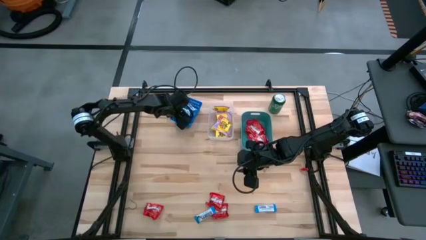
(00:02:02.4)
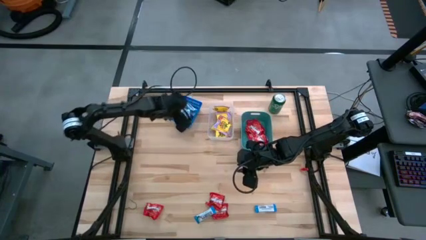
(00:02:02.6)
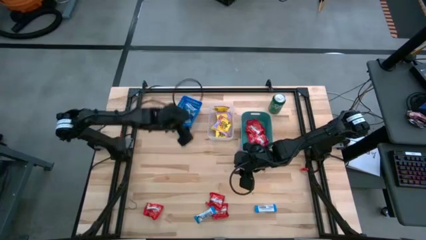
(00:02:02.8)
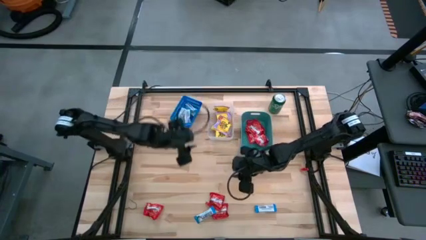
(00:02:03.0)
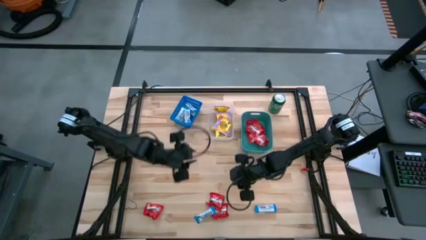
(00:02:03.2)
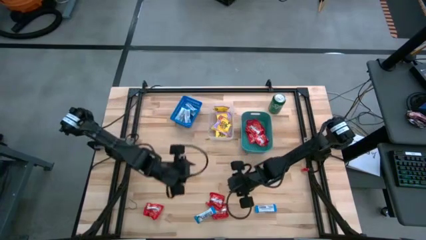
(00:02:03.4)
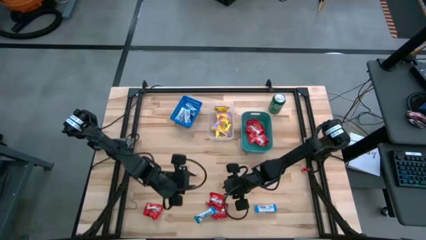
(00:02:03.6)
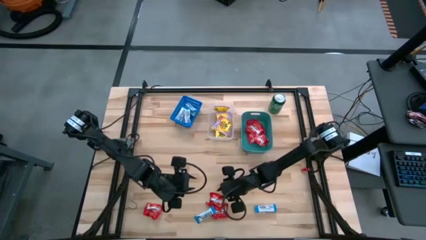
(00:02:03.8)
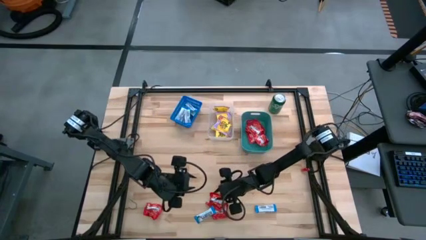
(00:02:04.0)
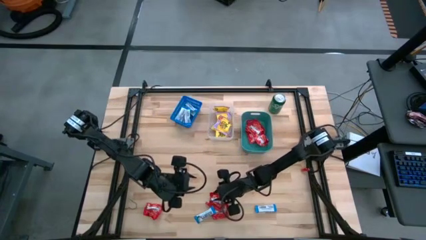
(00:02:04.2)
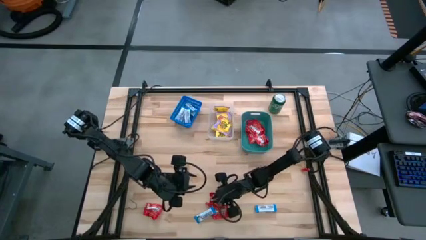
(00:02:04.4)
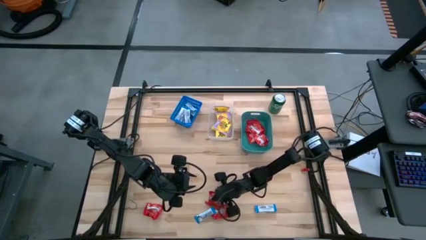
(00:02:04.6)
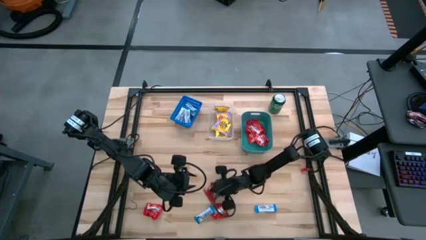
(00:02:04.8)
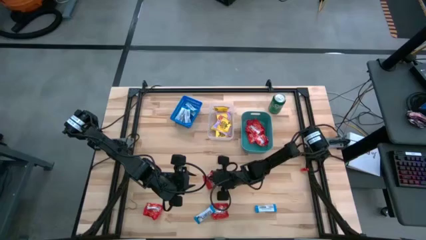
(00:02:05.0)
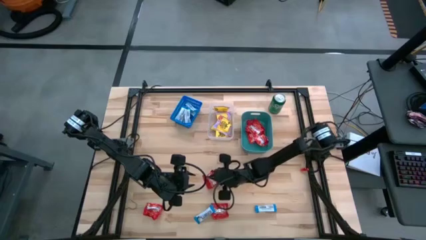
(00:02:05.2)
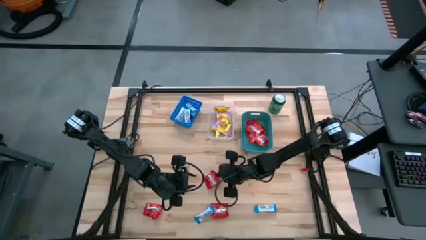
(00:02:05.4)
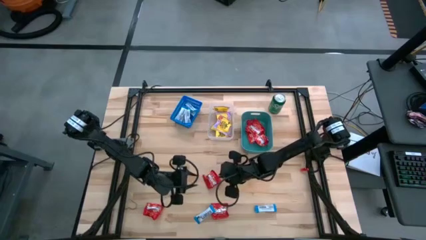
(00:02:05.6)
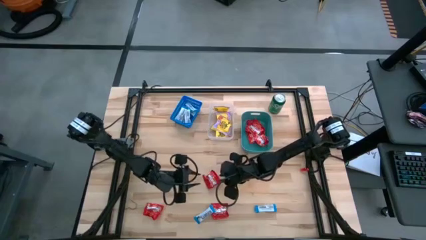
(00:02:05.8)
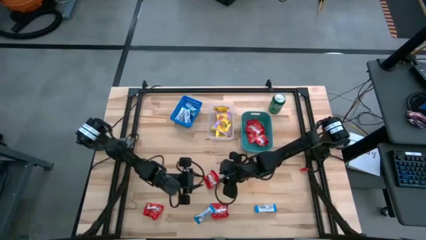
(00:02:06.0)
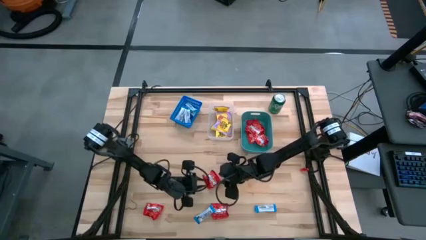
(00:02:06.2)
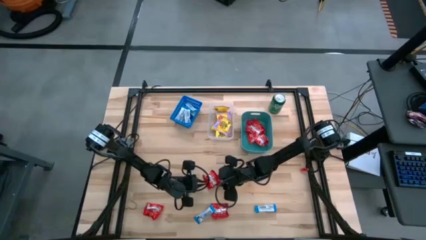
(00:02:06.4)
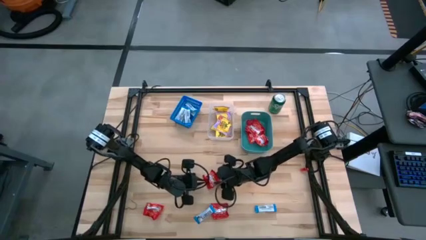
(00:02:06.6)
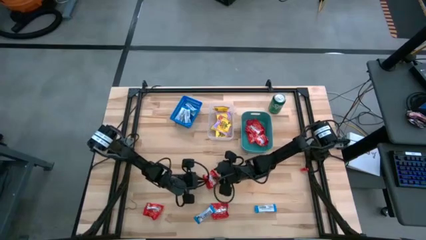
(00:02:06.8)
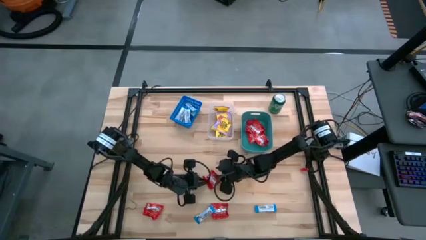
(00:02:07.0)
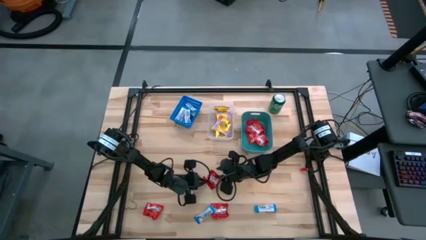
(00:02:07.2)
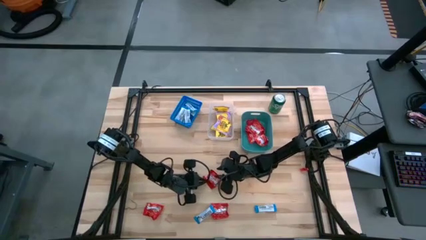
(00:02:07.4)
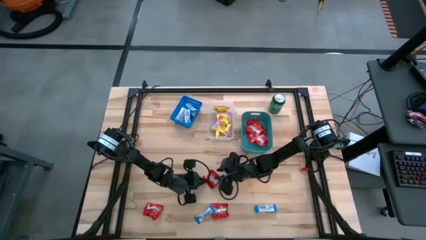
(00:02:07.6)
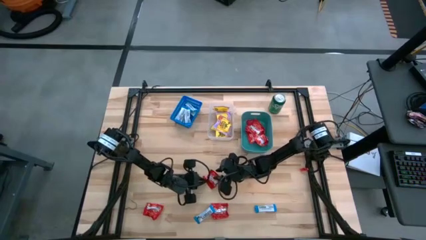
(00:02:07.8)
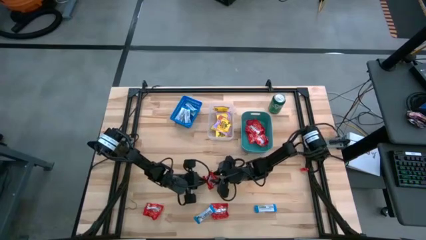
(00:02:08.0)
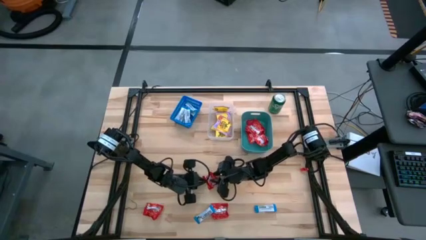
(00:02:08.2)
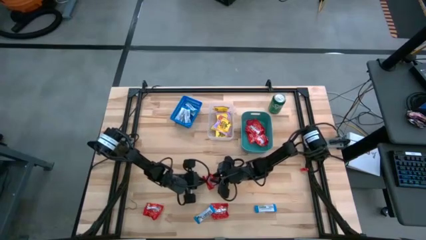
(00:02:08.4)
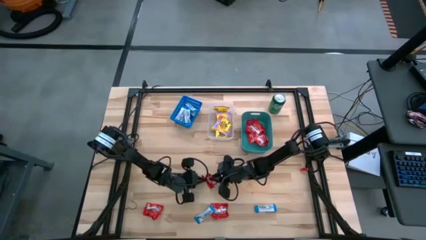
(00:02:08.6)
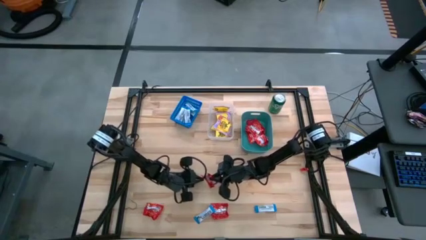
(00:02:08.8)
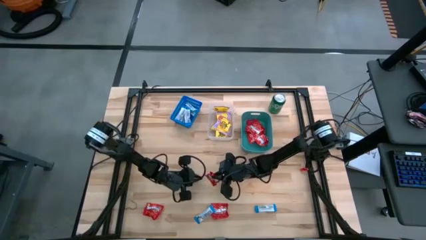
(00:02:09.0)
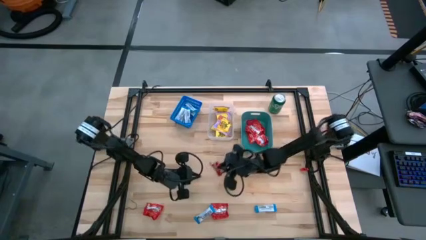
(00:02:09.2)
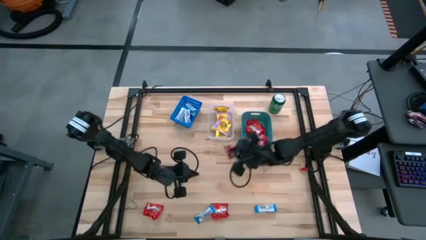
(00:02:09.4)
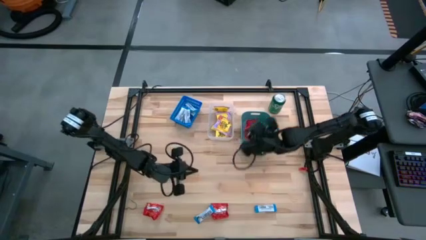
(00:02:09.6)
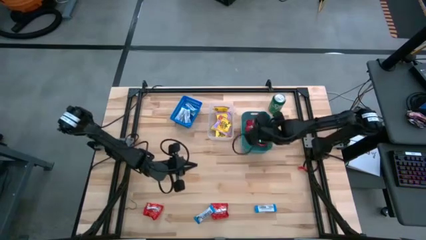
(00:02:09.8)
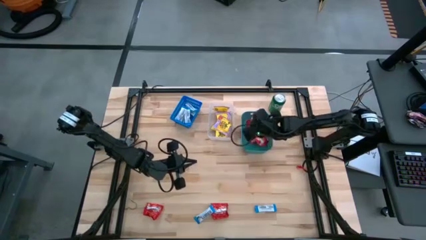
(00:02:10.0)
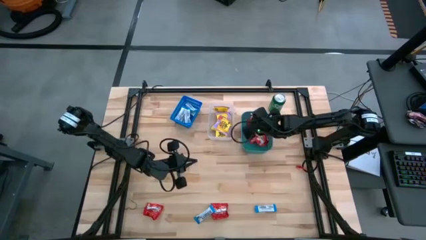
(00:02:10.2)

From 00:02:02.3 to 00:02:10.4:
Task: Sort candy
Put the red candy into the green bin
